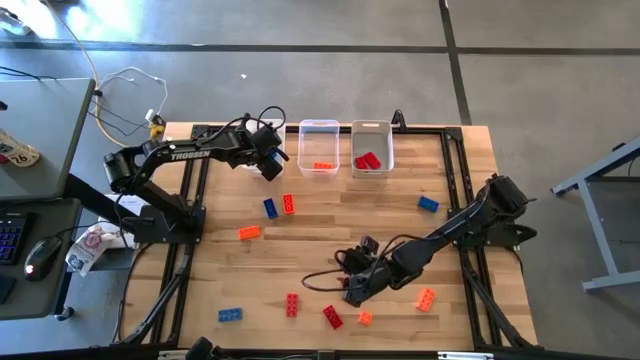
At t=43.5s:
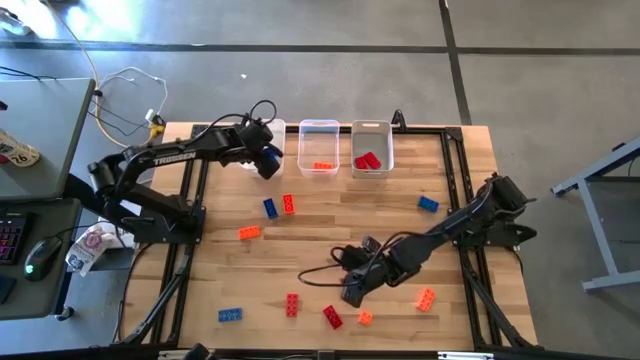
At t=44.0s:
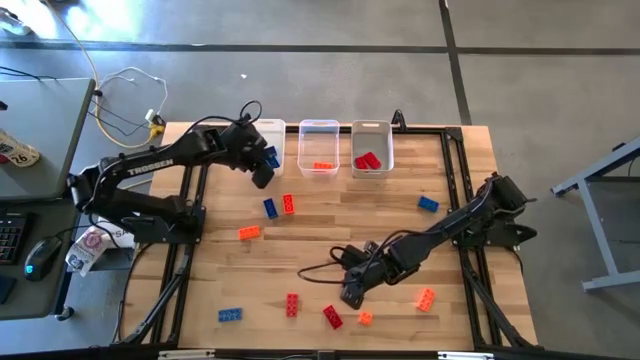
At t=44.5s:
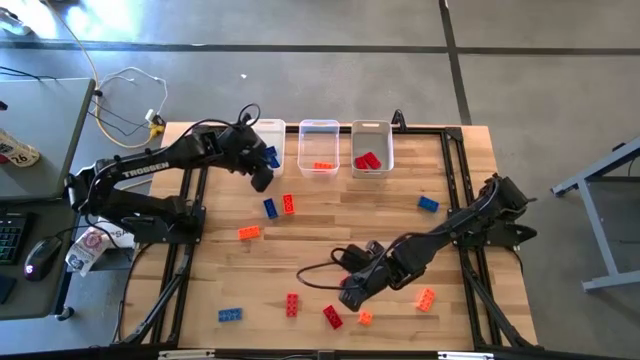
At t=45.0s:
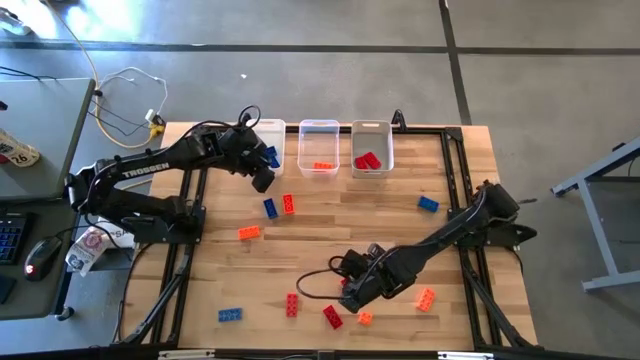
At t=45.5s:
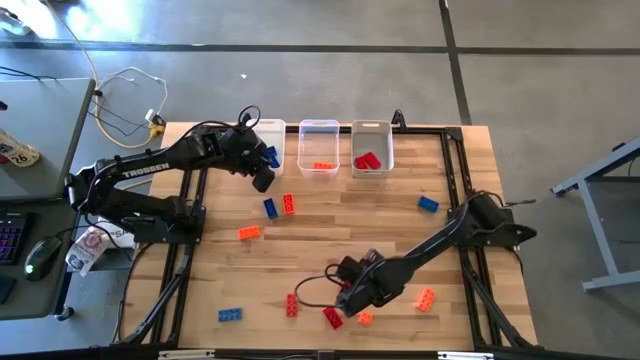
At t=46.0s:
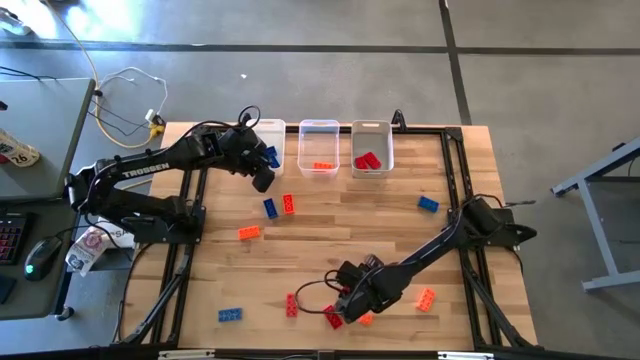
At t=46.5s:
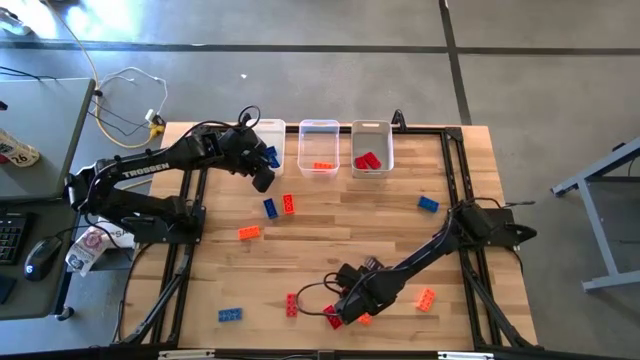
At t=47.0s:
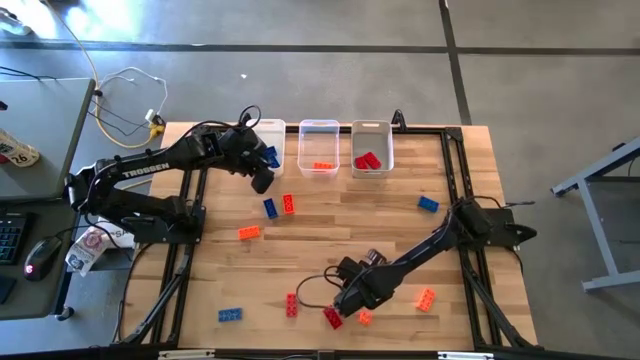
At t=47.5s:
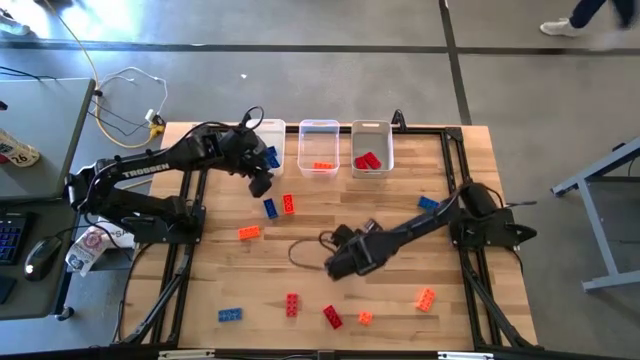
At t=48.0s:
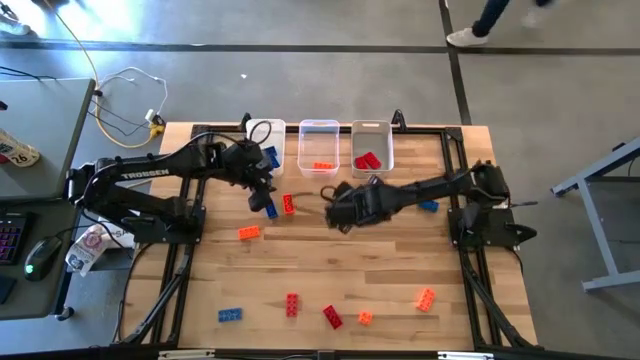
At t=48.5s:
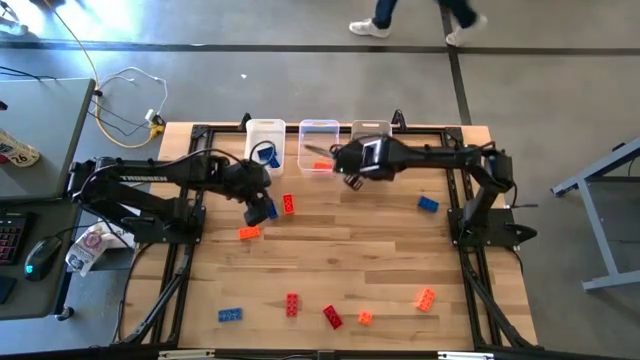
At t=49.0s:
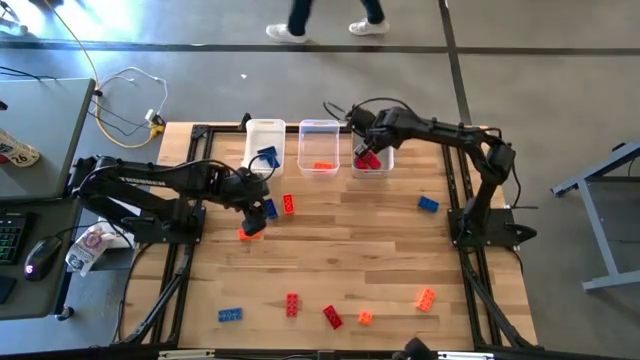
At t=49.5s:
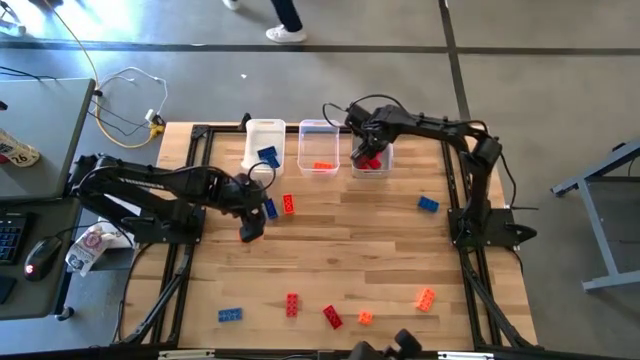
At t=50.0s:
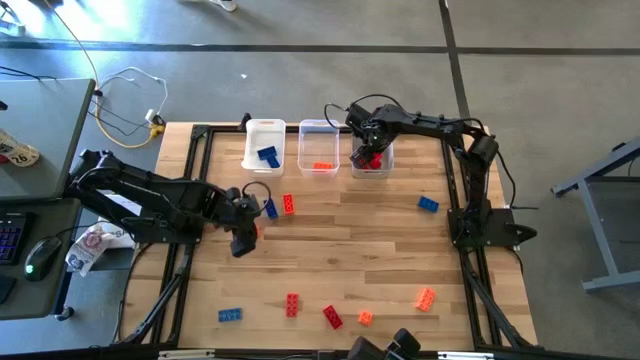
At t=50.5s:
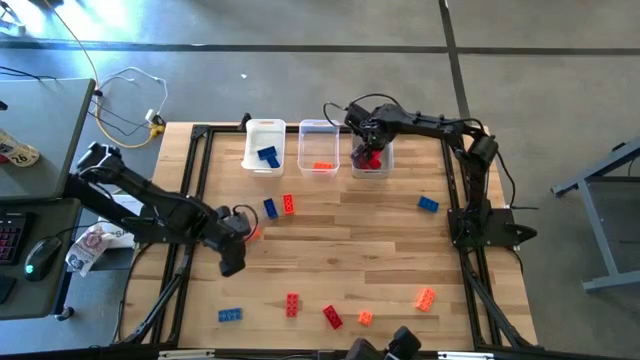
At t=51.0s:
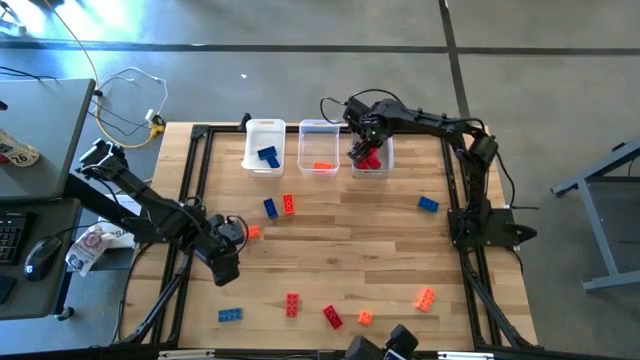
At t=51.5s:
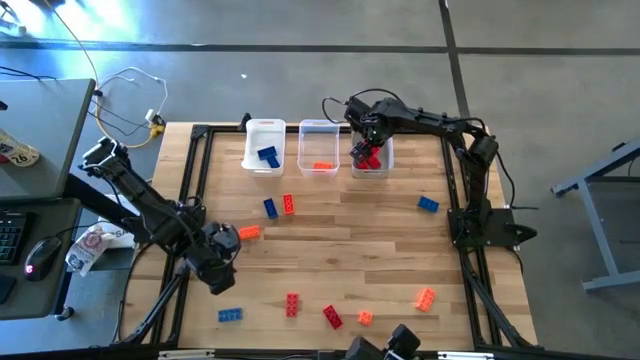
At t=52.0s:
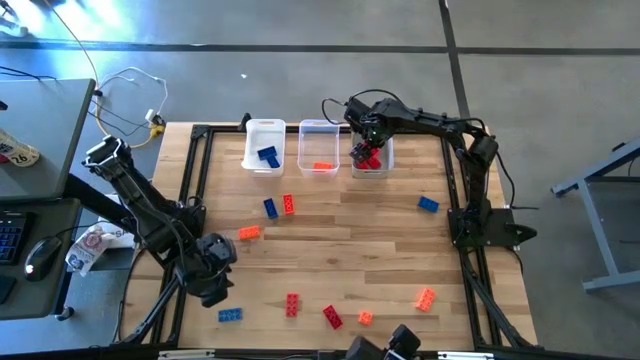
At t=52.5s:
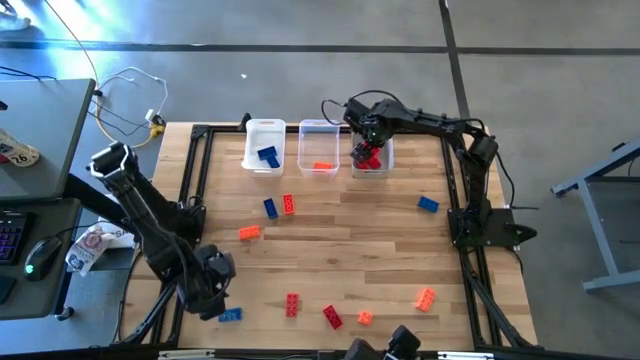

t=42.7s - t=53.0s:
Task: Sort & place blocks by color
Put the red game piece into the gray bin

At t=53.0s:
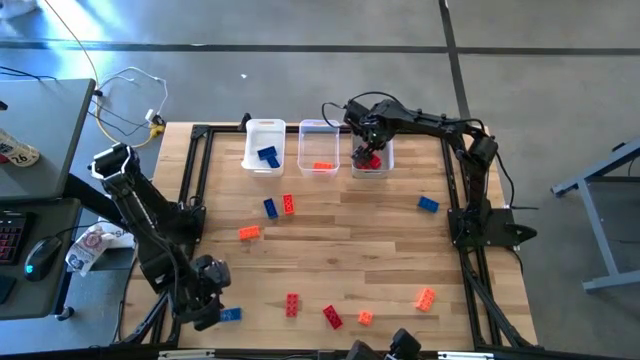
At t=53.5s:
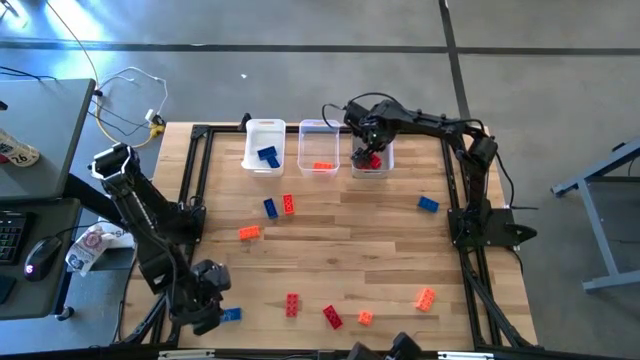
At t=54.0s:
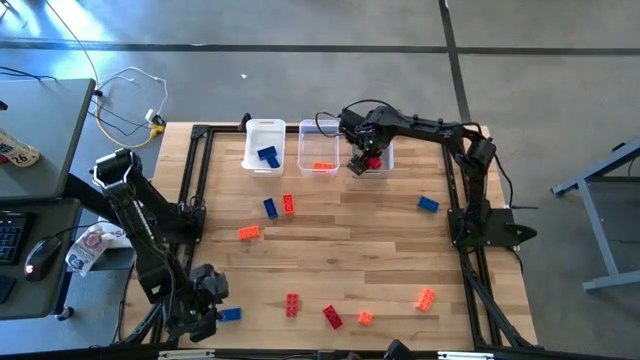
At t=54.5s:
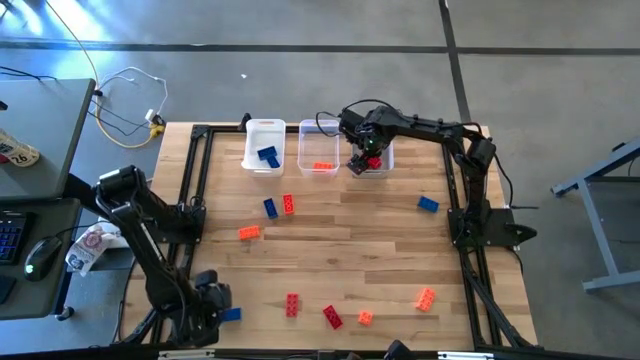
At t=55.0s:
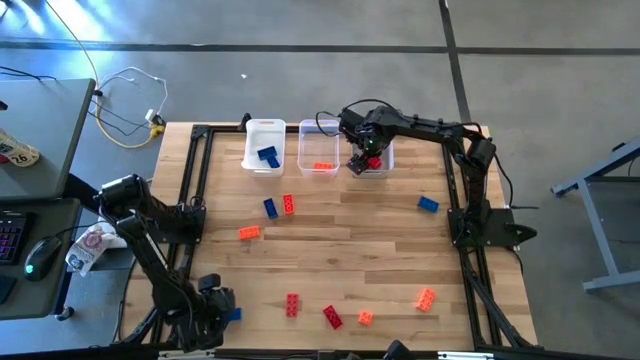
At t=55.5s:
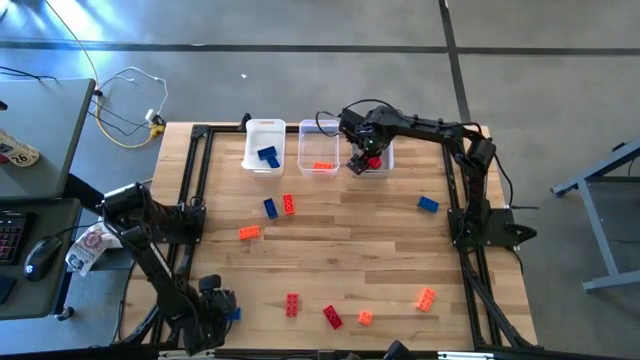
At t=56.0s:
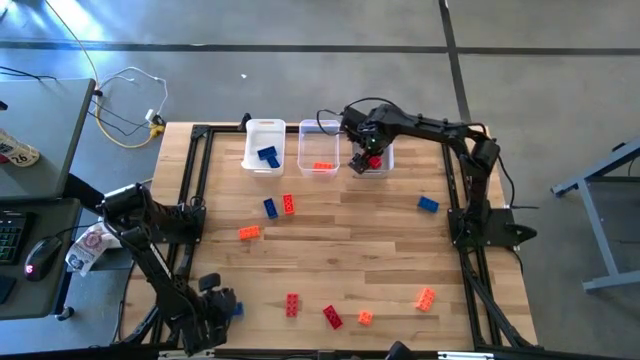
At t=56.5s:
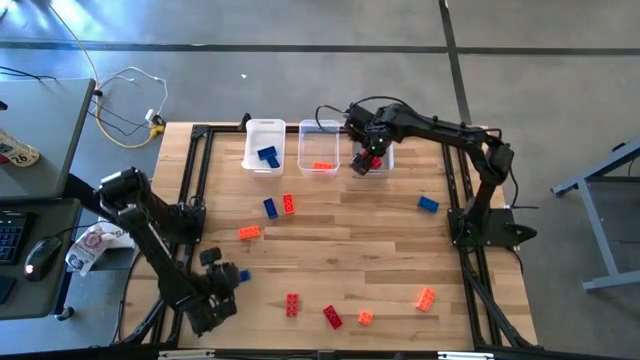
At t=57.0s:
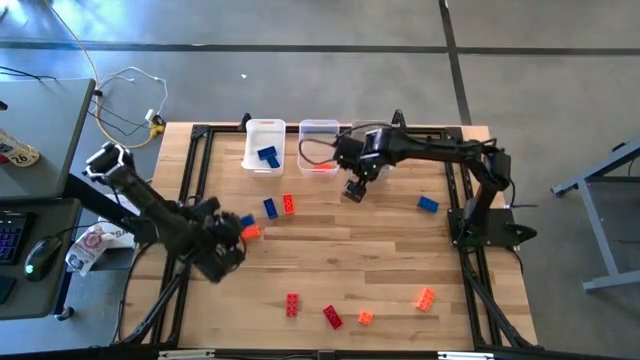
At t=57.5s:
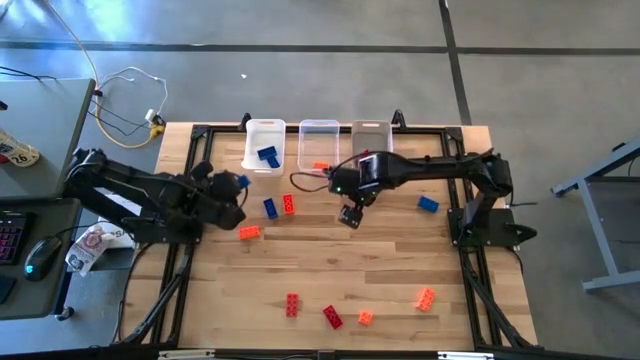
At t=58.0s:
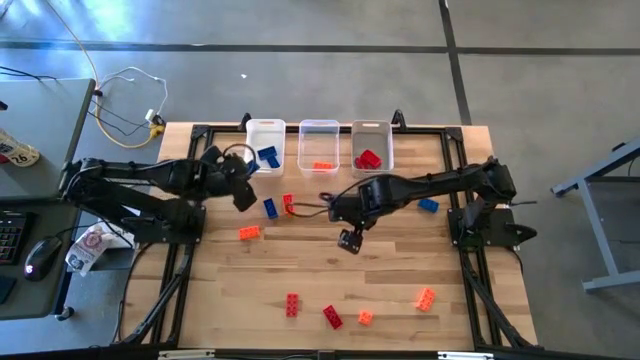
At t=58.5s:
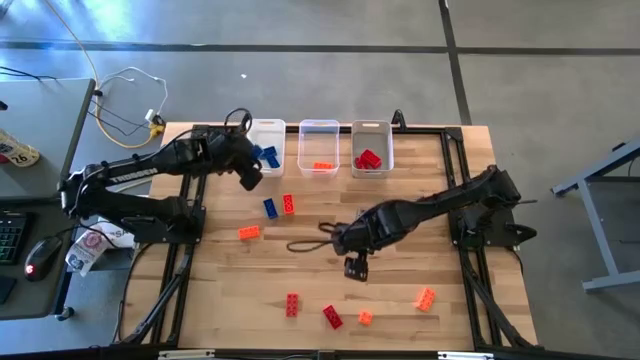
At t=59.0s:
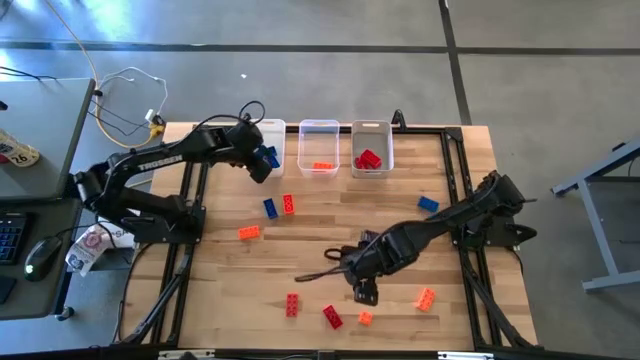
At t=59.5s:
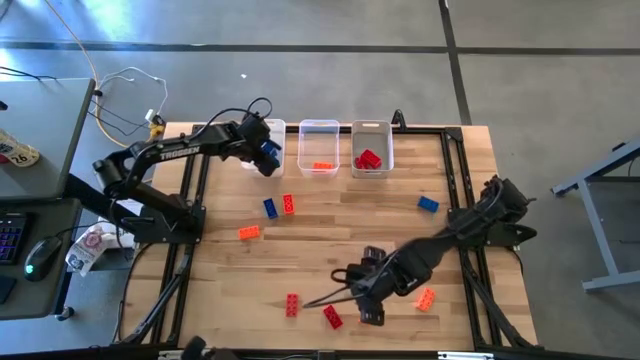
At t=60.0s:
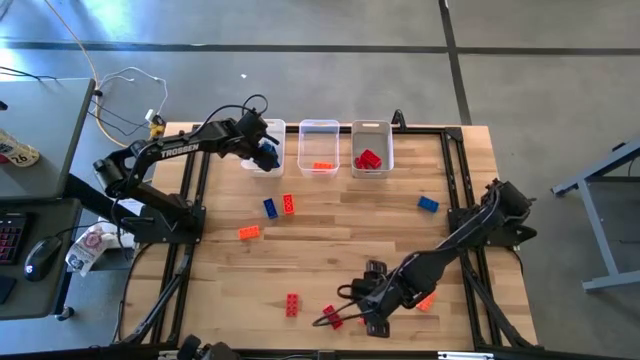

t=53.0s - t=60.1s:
Put the blue game piece into the white bin

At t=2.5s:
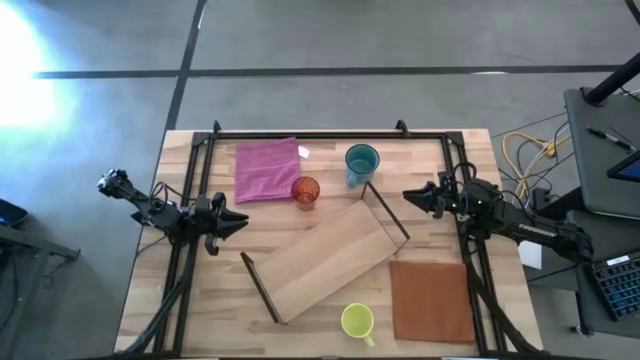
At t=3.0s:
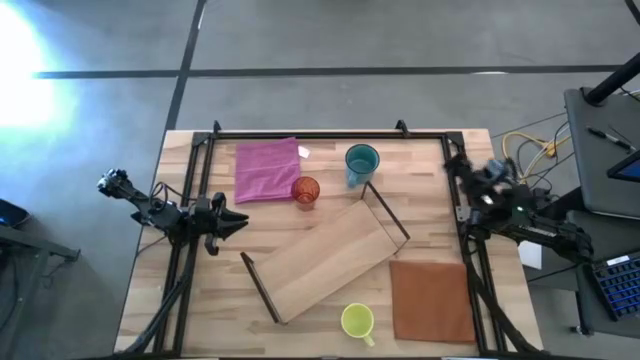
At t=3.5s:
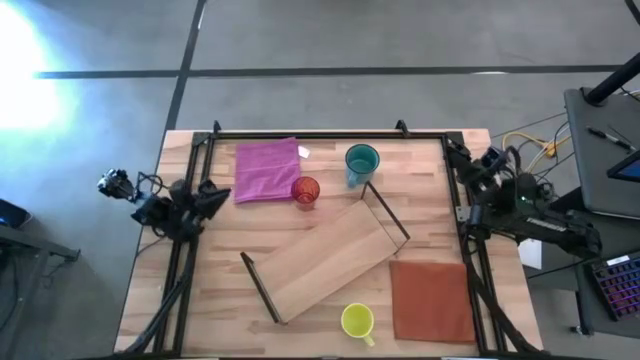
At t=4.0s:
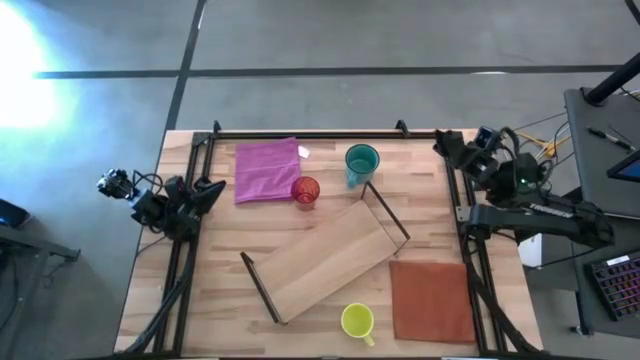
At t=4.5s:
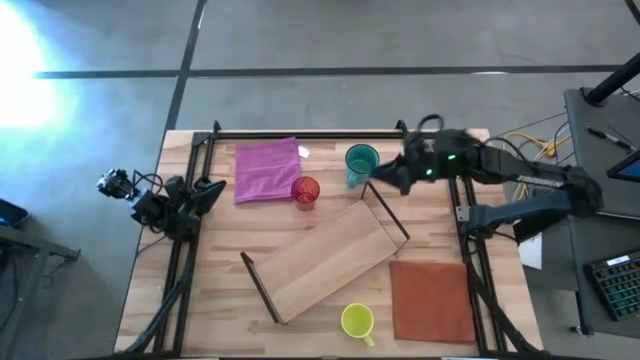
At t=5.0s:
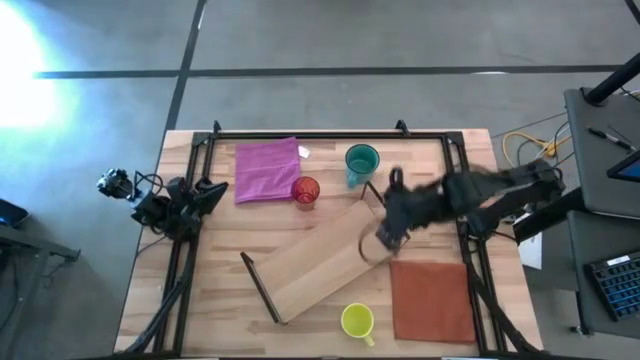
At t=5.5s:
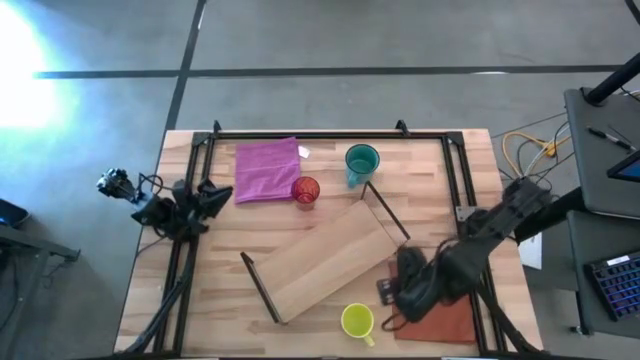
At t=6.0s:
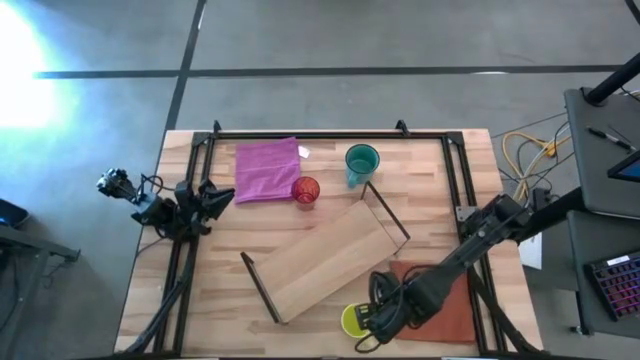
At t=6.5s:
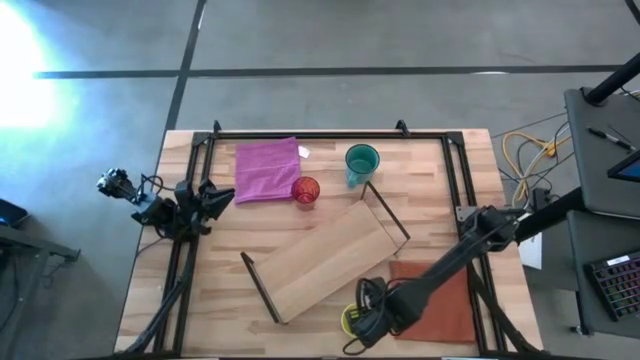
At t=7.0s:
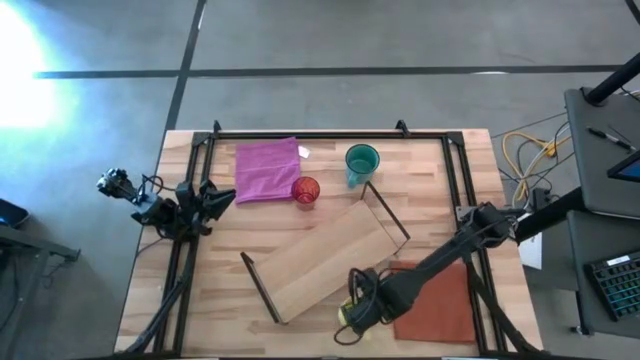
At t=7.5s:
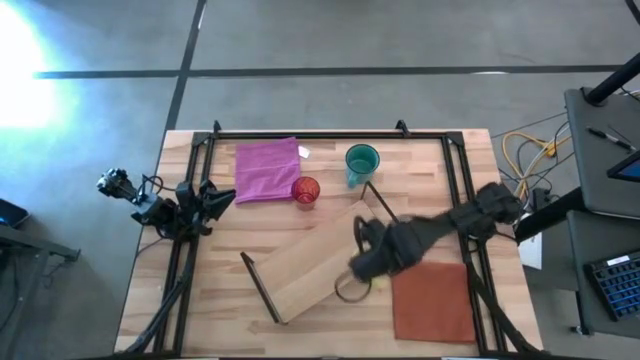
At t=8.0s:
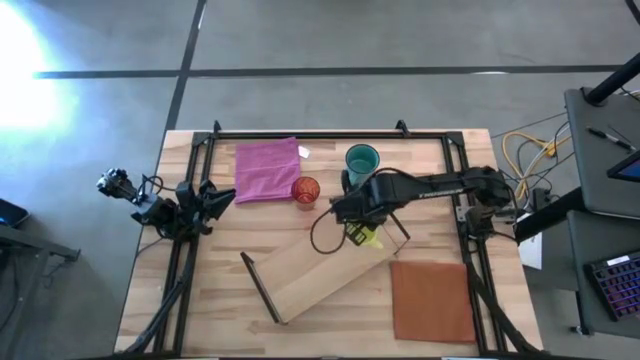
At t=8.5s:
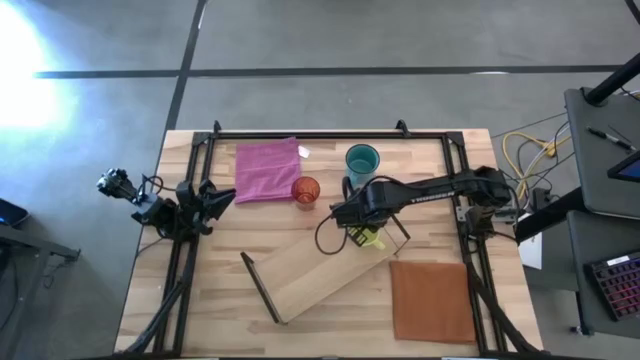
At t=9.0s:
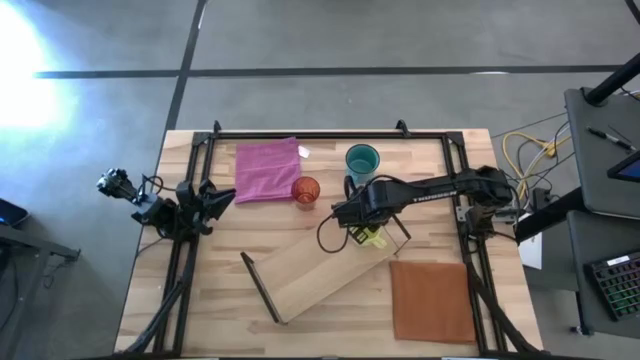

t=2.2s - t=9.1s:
Task: Stack small to large cups/mugs on shelf
Put the yellow mug on the shelf
